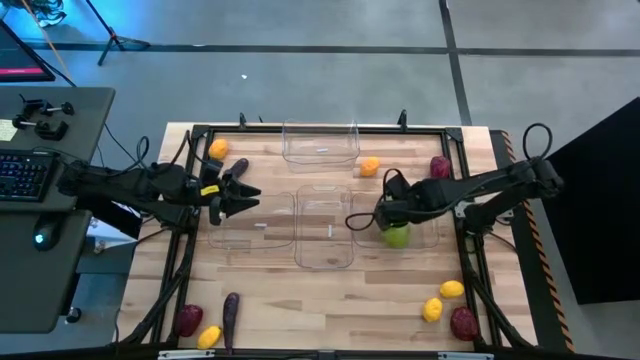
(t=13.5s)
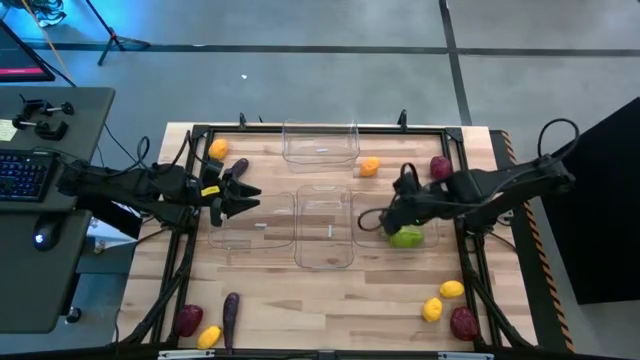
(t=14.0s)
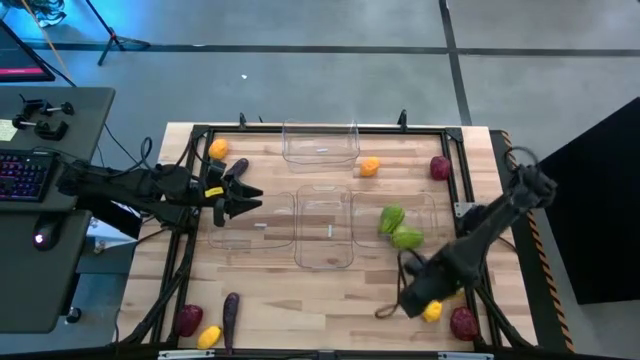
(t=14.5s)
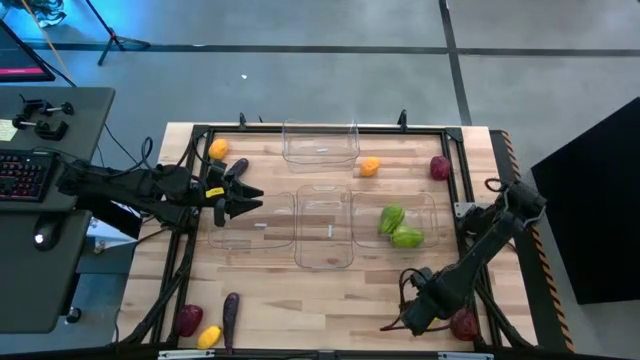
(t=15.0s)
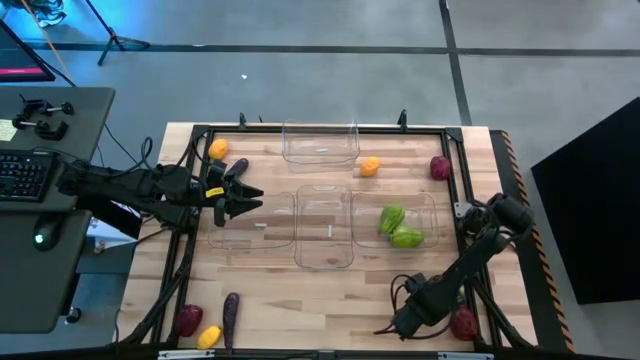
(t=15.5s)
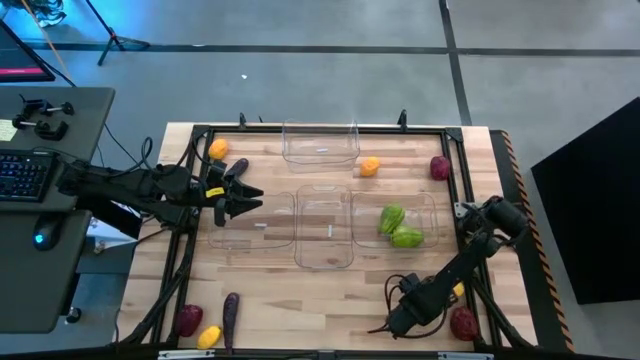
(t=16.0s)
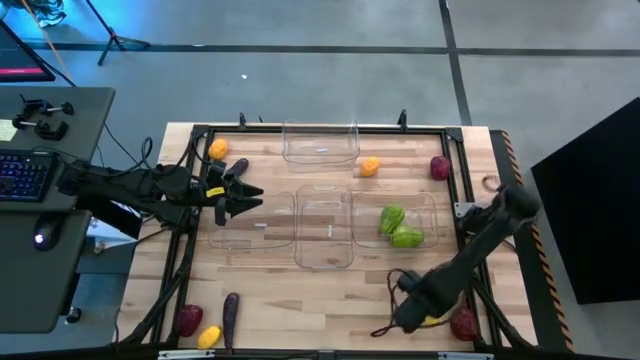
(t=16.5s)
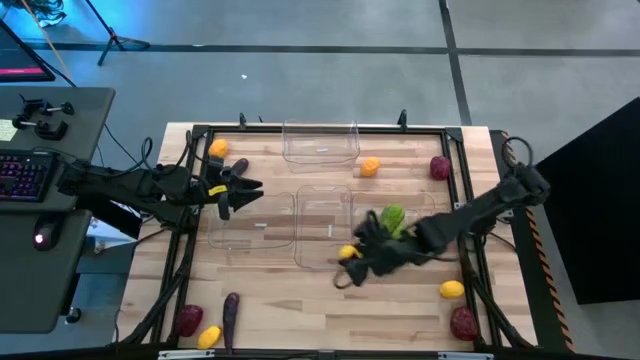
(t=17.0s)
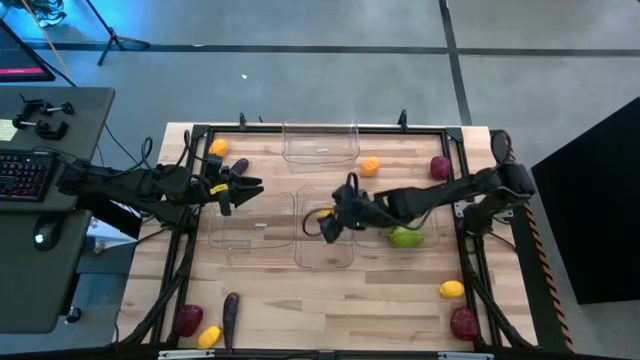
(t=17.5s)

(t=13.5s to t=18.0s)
Task: Sort produce into baskets
Put the lemon into the middle transparent bin

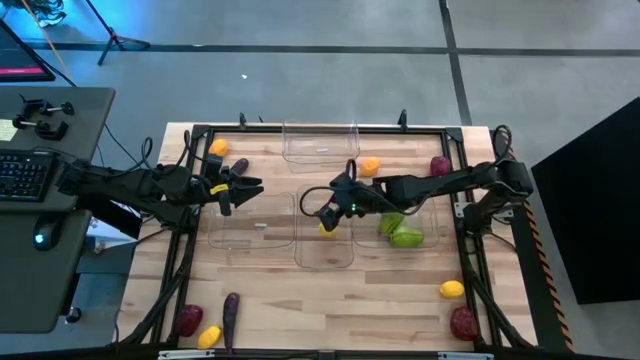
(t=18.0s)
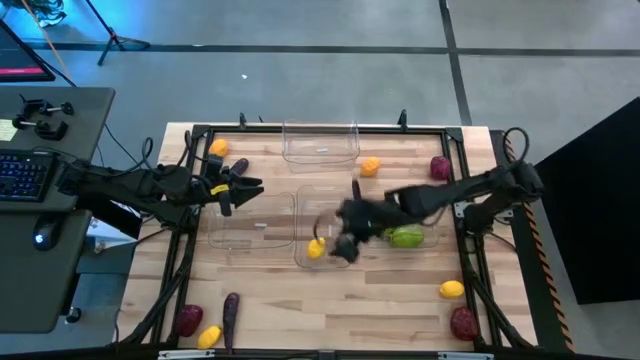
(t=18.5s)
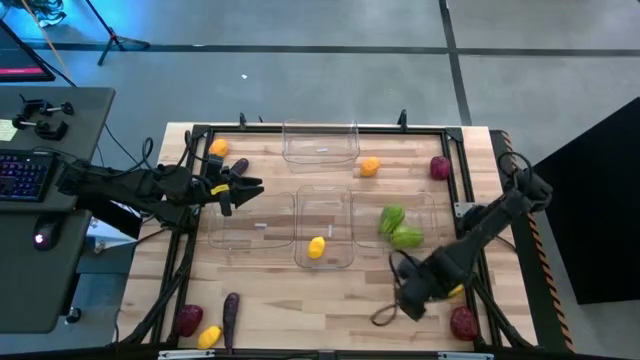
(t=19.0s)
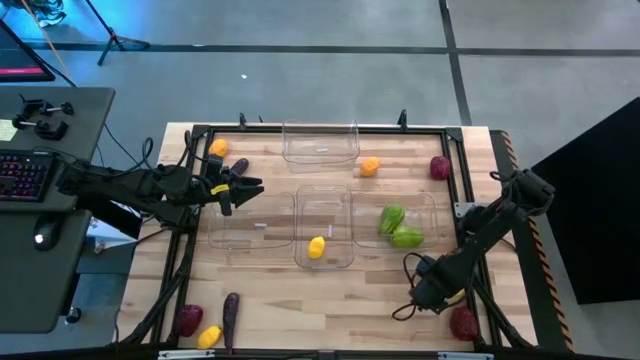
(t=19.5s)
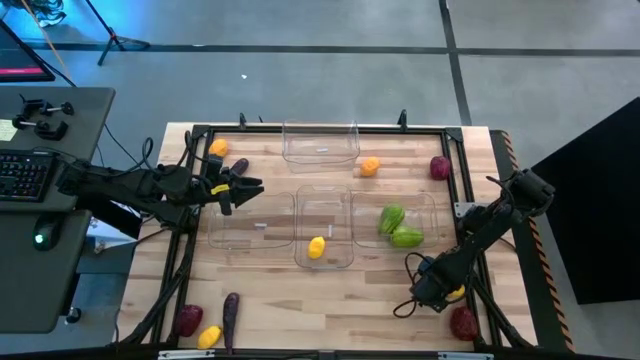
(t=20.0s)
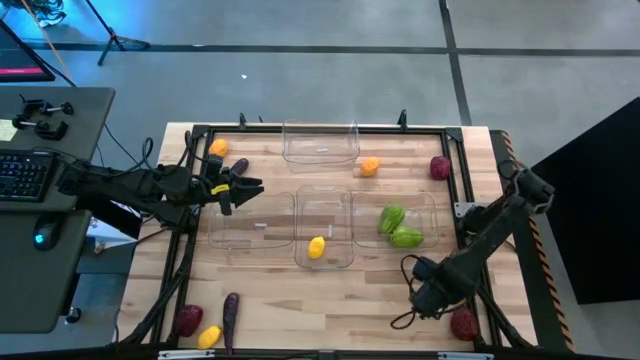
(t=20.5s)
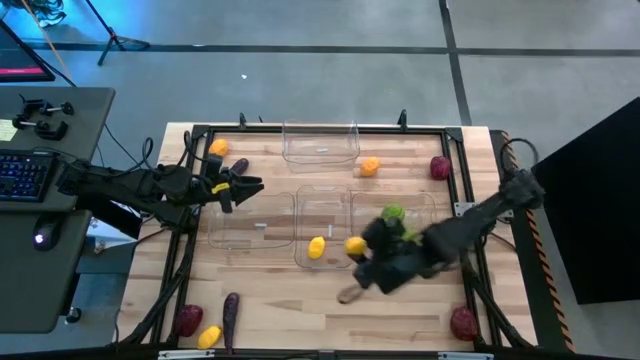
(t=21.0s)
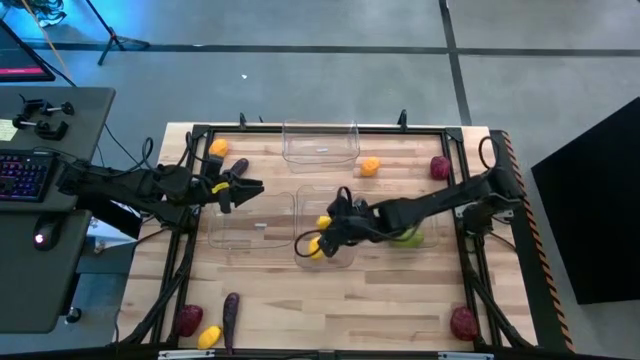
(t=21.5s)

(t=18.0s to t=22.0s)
Put the lemon into the middle transparent bin

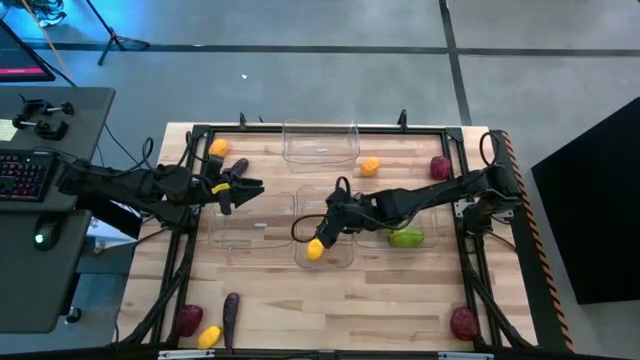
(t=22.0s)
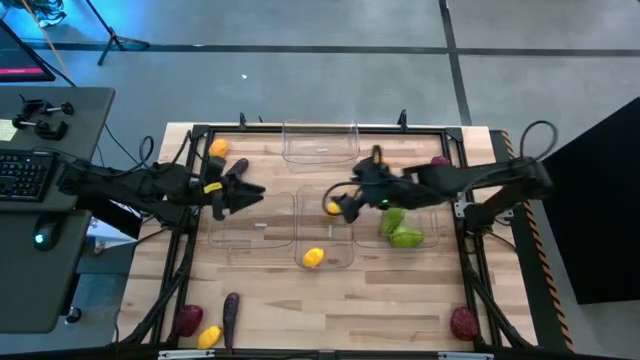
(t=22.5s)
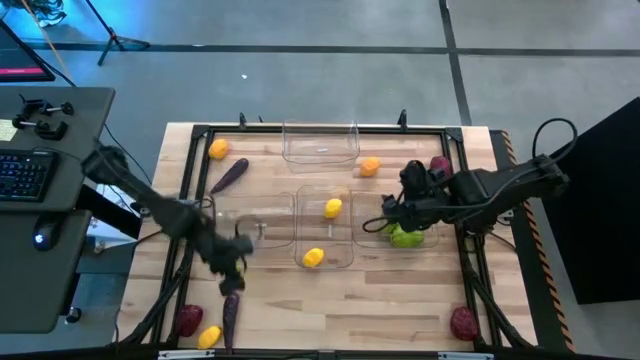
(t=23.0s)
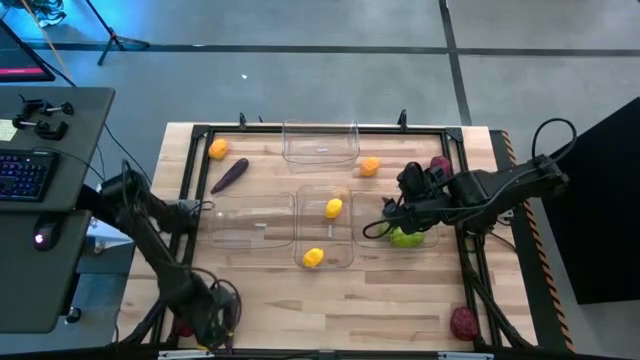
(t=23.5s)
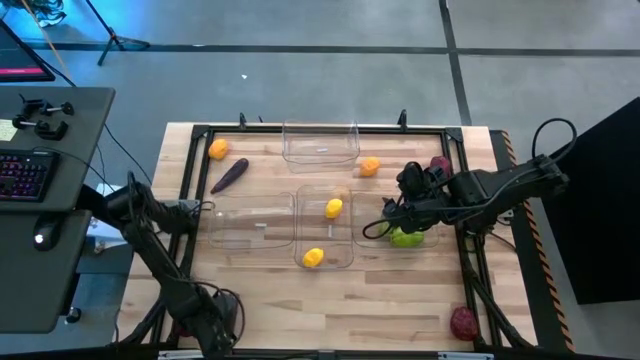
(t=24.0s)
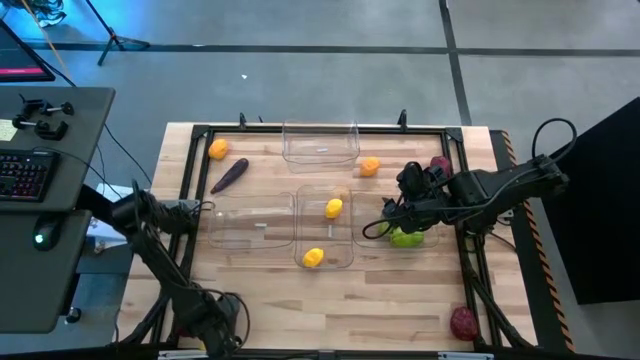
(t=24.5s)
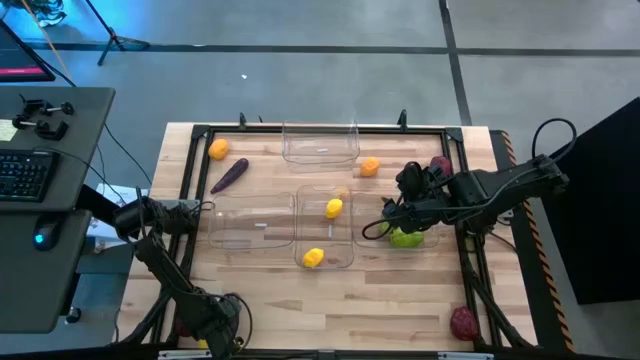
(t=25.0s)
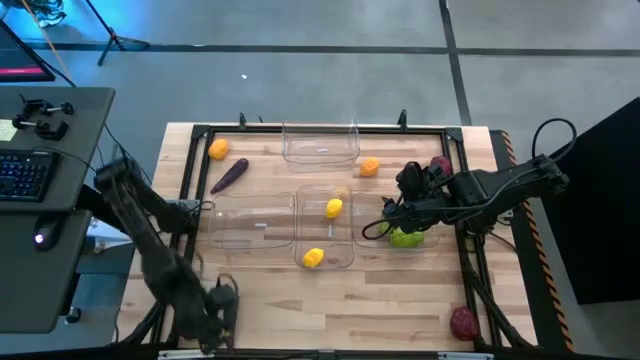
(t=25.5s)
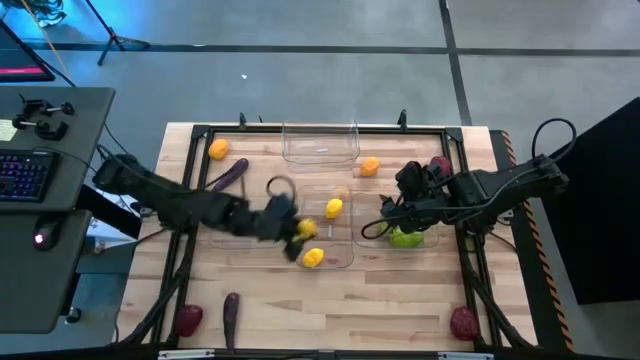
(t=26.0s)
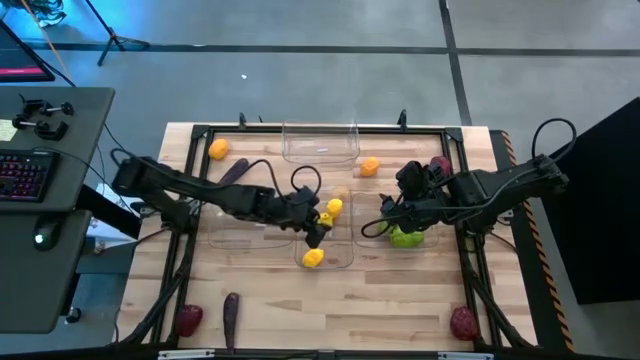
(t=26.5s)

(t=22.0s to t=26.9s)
Put the lemon into the middle transparent bin

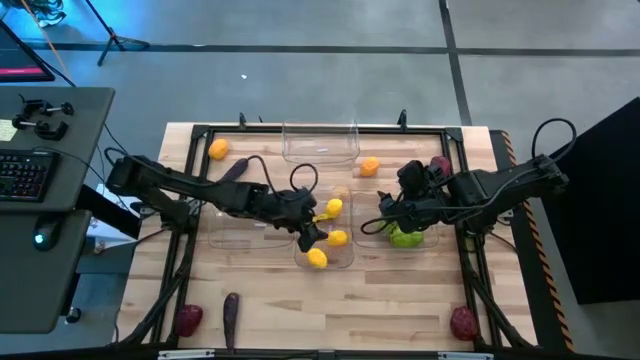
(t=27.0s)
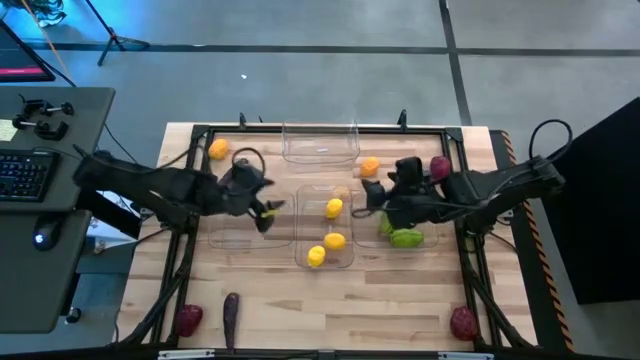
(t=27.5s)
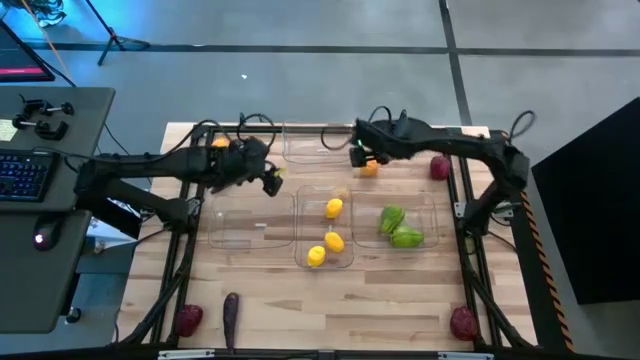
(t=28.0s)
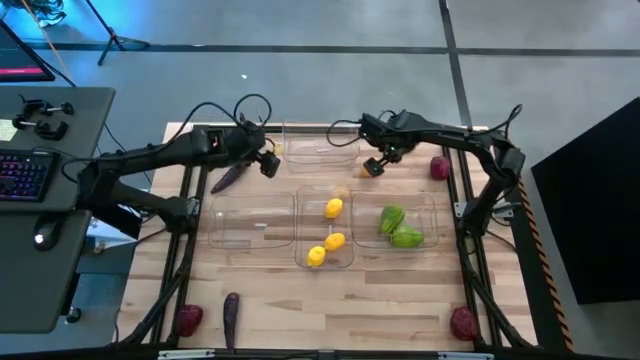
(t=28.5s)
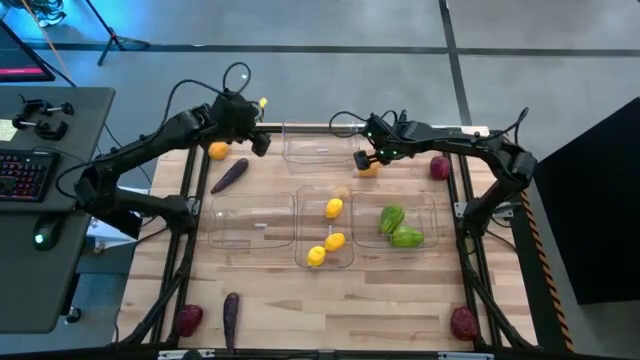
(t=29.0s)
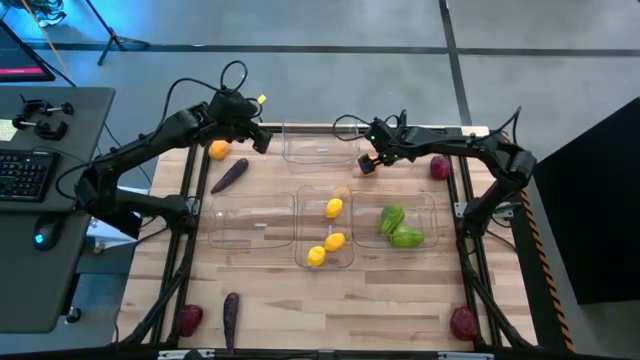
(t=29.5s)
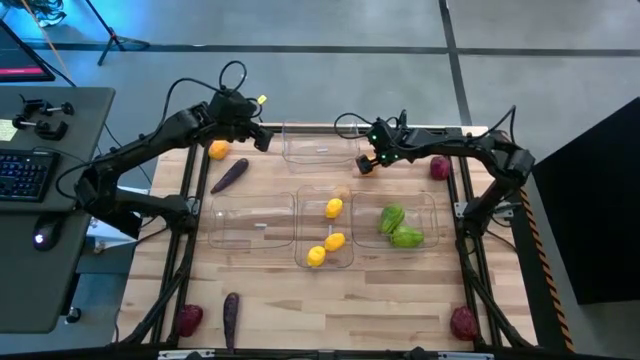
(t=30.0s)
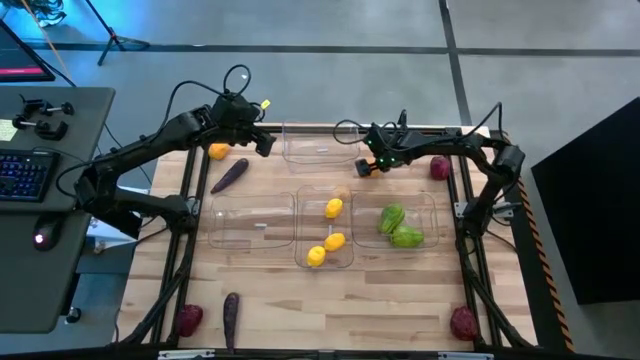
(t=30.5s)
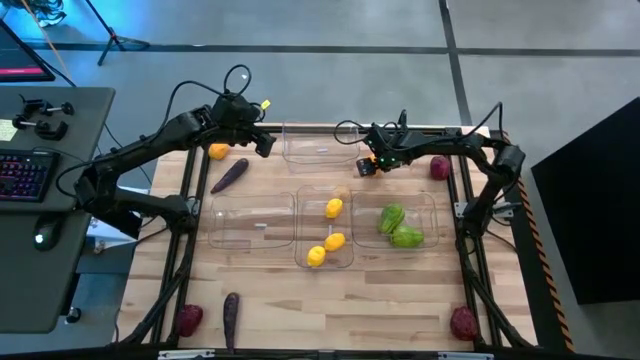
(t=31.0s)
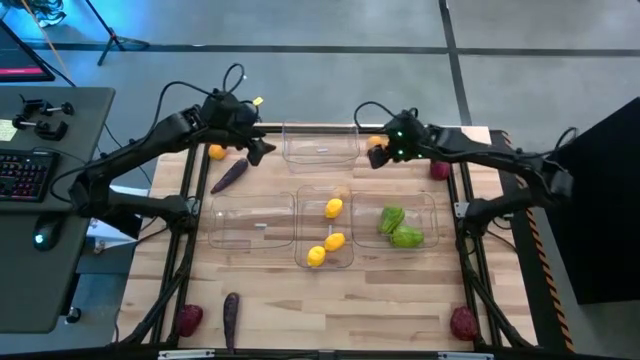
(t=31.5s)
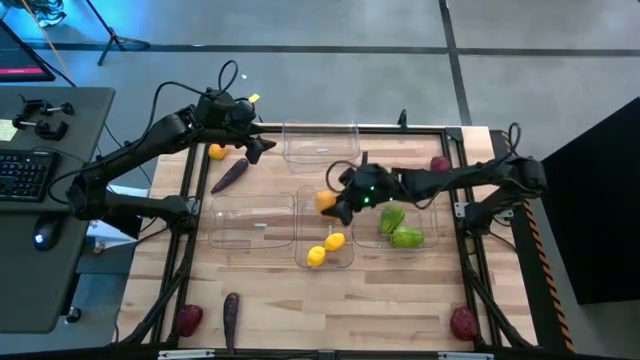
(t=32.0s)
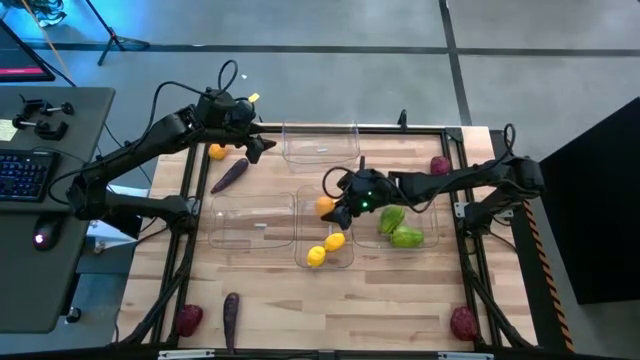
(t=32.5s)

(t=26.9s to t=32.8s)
Put the lemon into the middle transparent bin

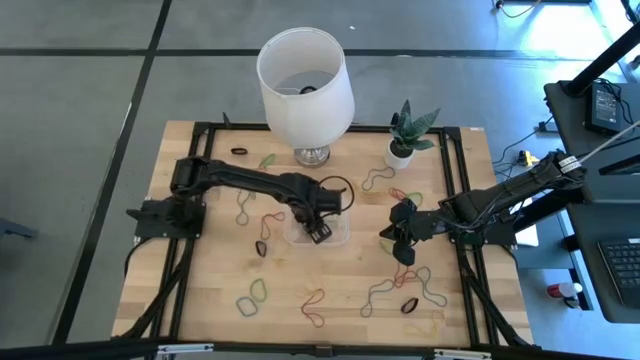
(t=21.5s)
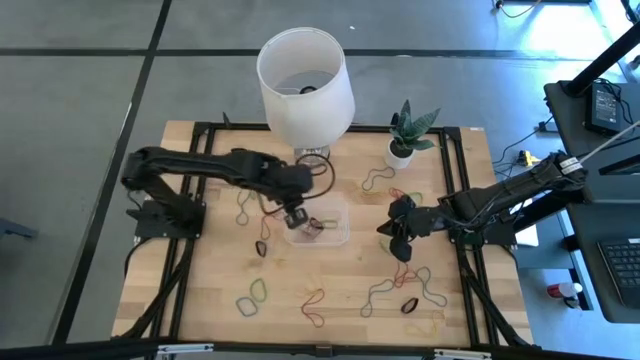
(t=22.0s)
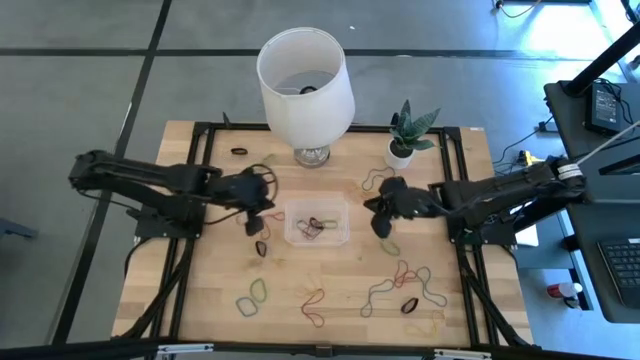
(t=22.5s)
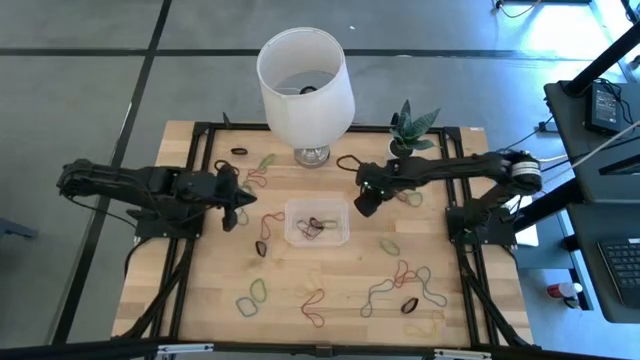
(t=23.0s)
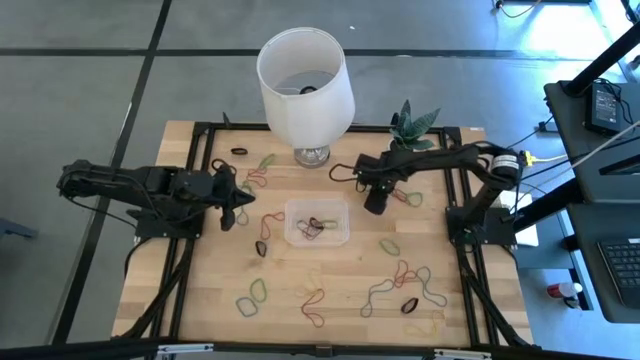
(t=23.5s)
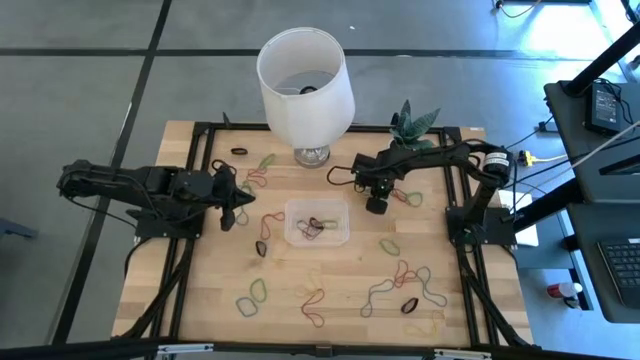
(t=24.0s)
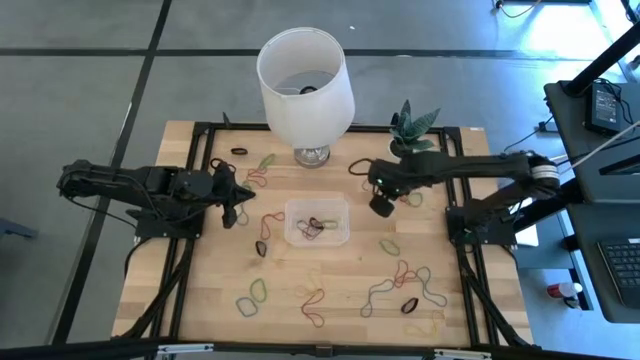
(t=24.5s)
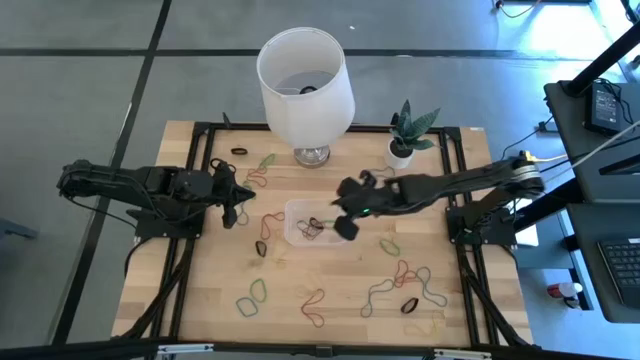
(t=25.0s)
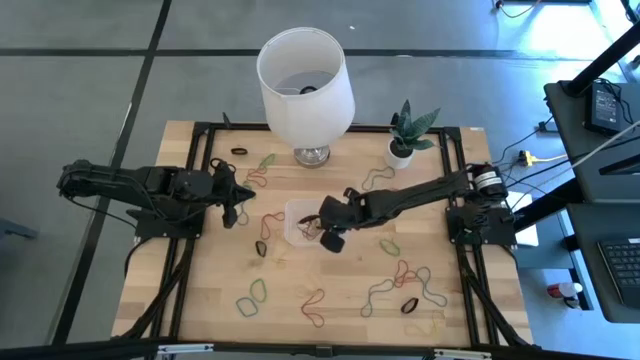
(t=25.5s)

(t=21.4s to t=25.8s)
Task: Pick and place rubber bands into bin
Put the yellow rubber band into the transparent bin
